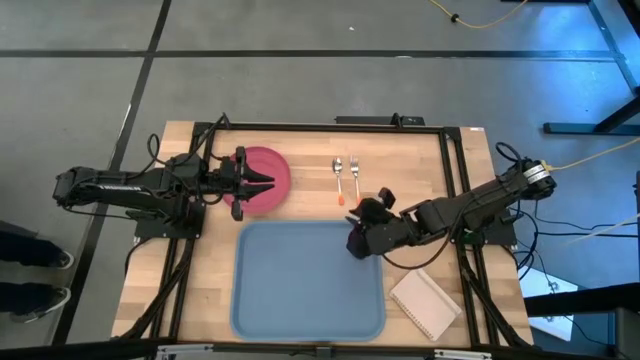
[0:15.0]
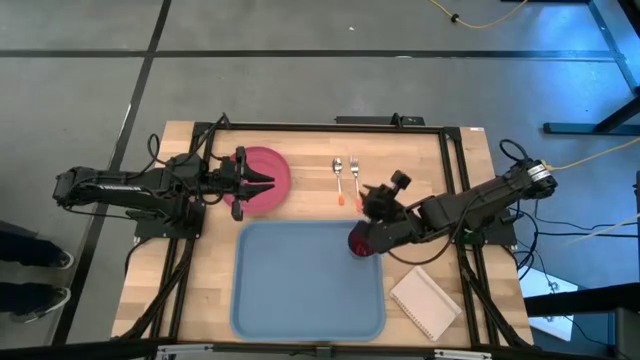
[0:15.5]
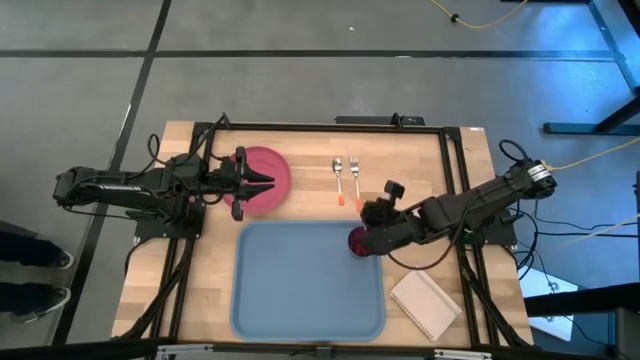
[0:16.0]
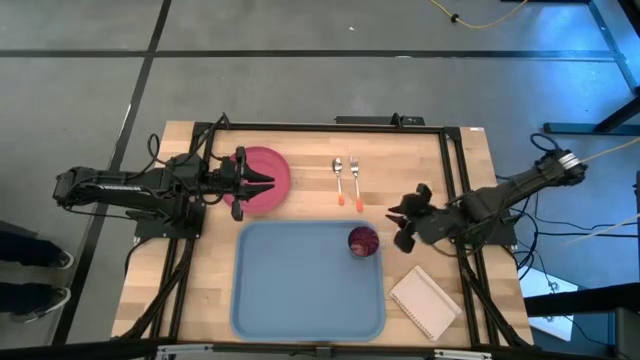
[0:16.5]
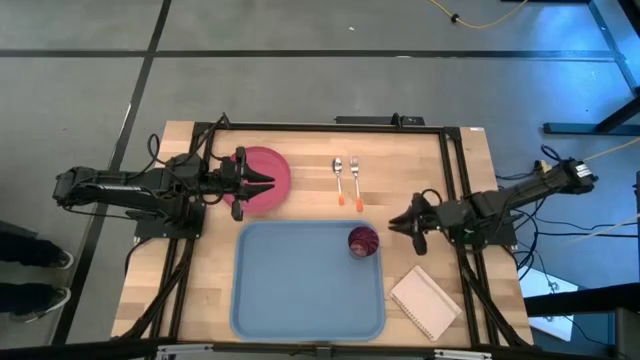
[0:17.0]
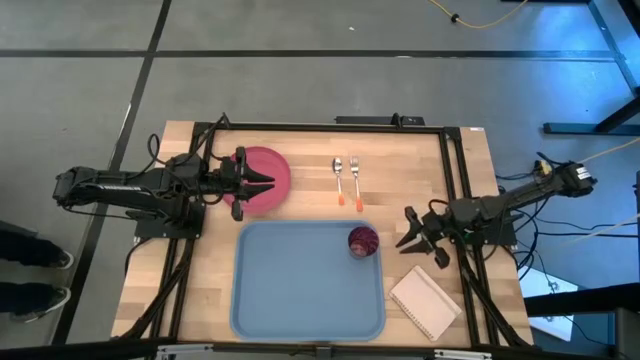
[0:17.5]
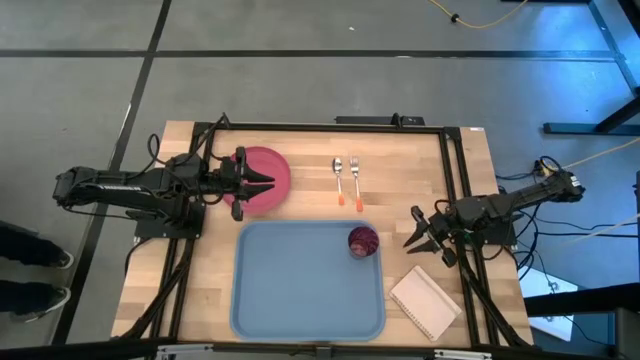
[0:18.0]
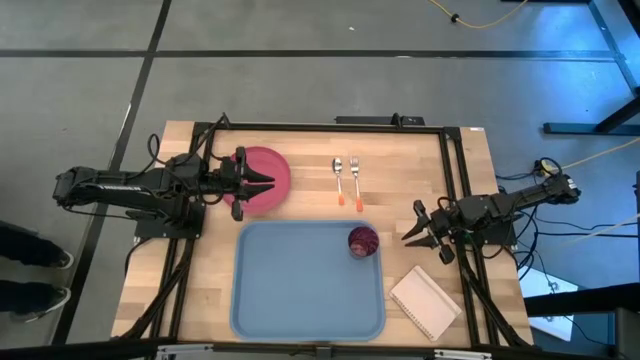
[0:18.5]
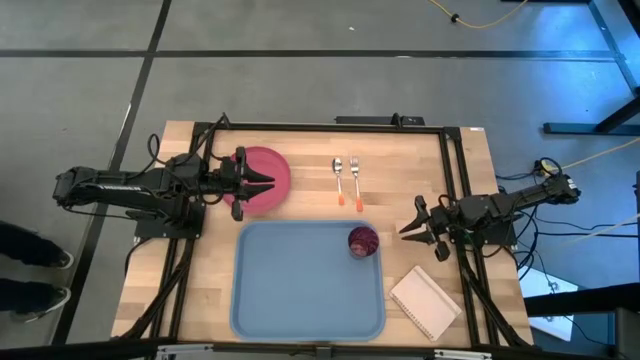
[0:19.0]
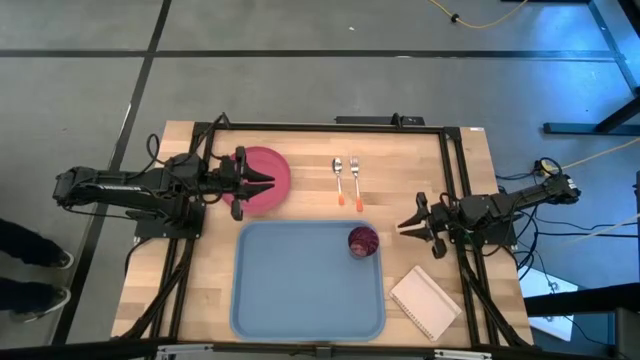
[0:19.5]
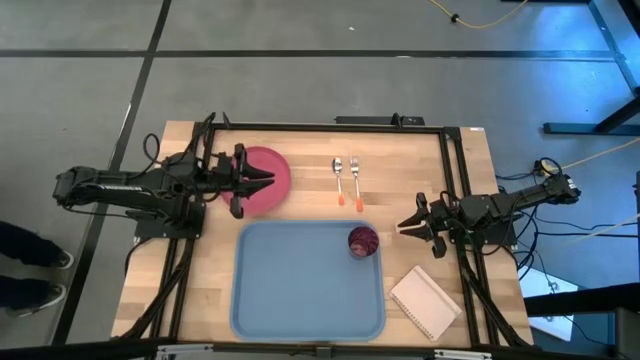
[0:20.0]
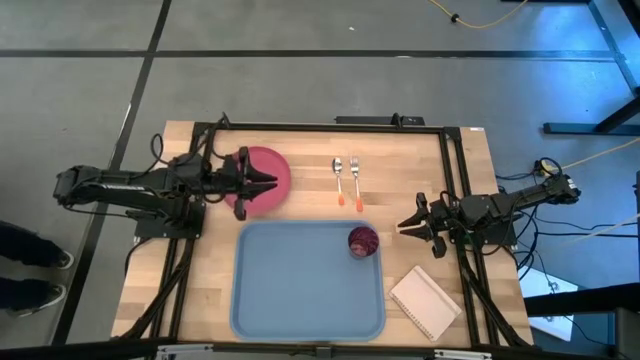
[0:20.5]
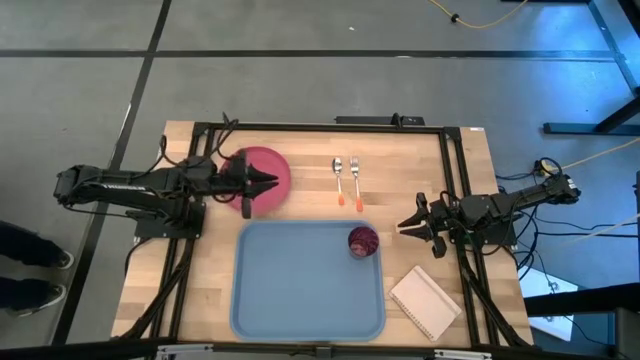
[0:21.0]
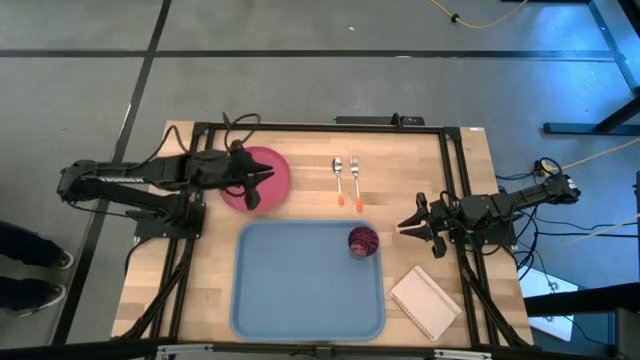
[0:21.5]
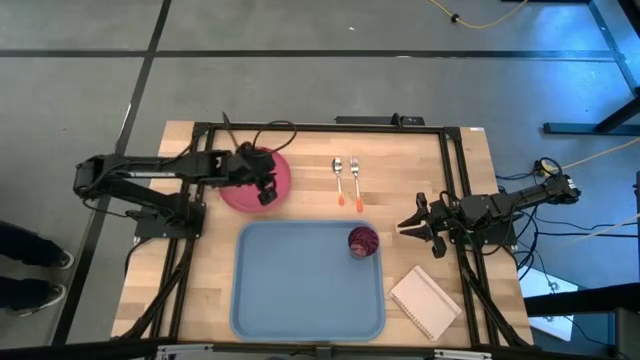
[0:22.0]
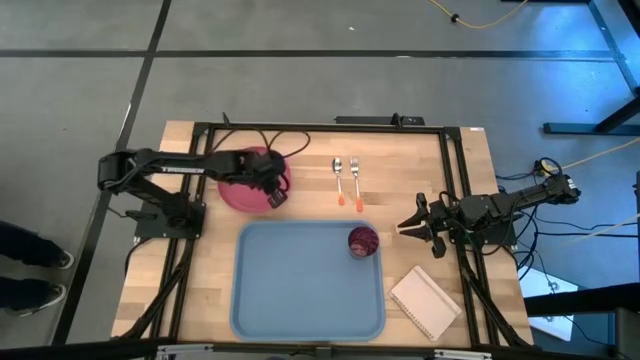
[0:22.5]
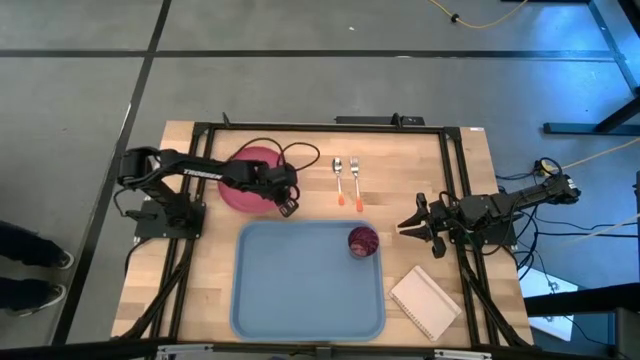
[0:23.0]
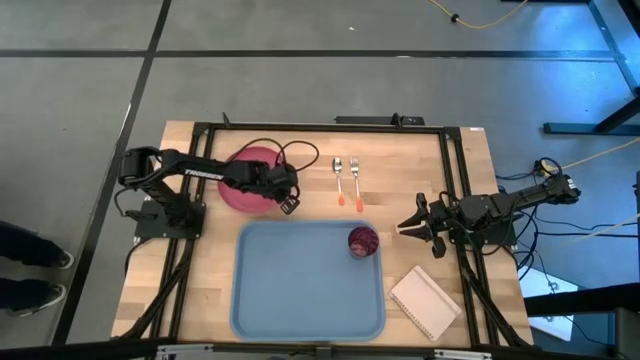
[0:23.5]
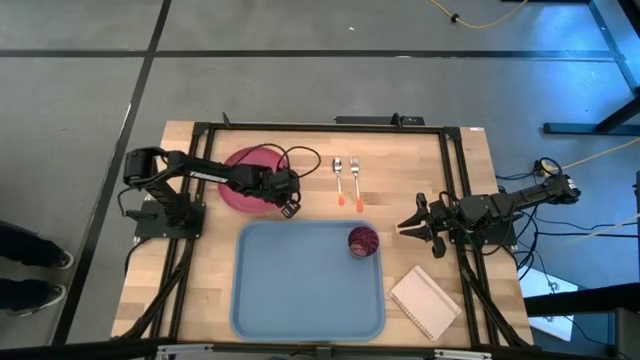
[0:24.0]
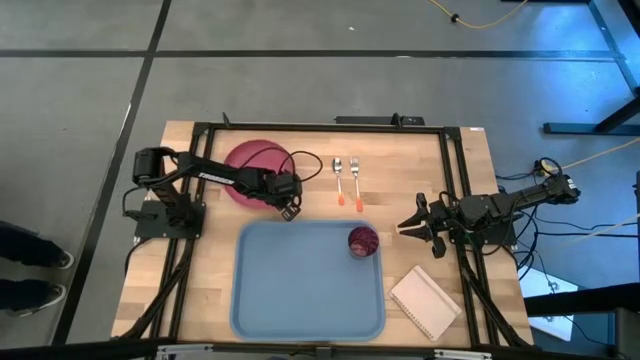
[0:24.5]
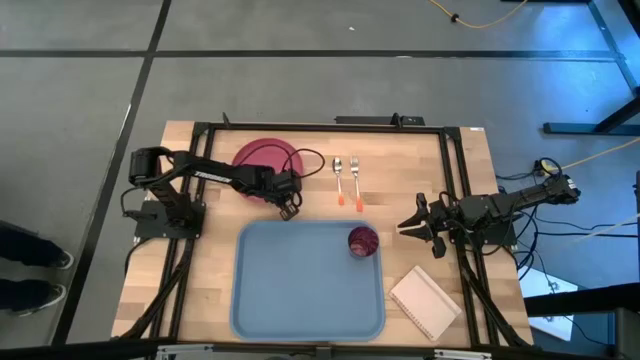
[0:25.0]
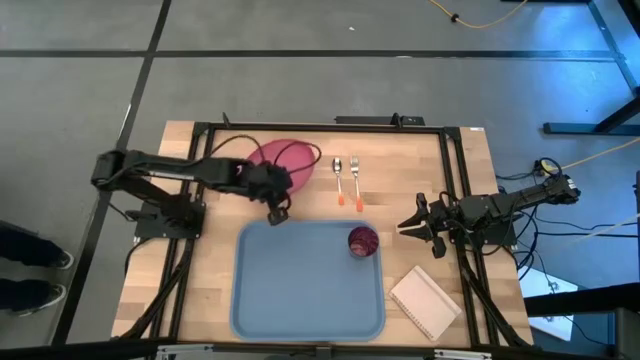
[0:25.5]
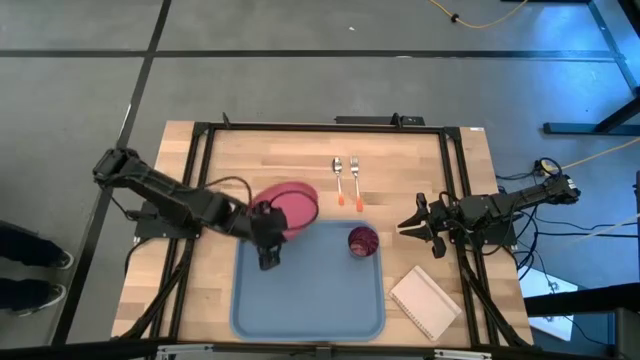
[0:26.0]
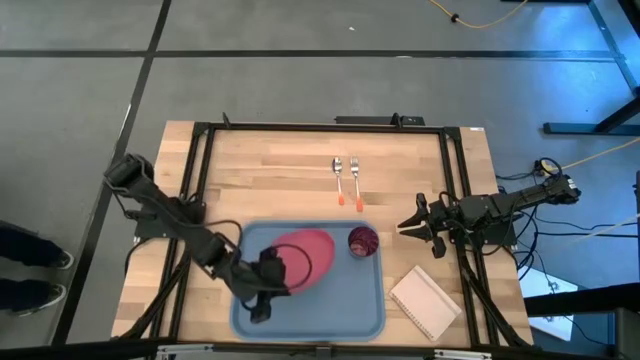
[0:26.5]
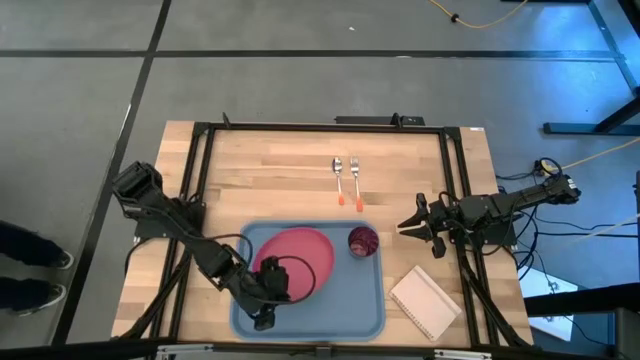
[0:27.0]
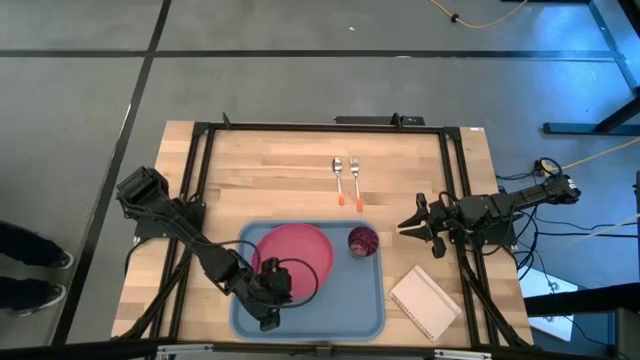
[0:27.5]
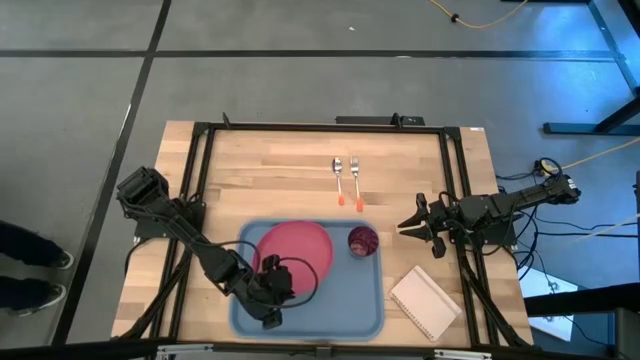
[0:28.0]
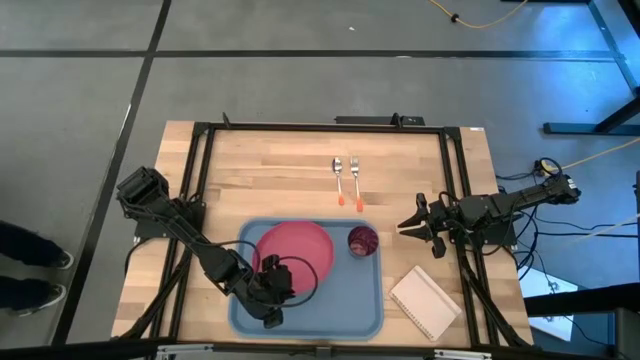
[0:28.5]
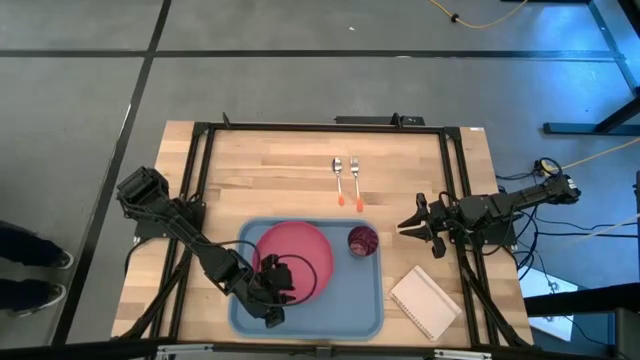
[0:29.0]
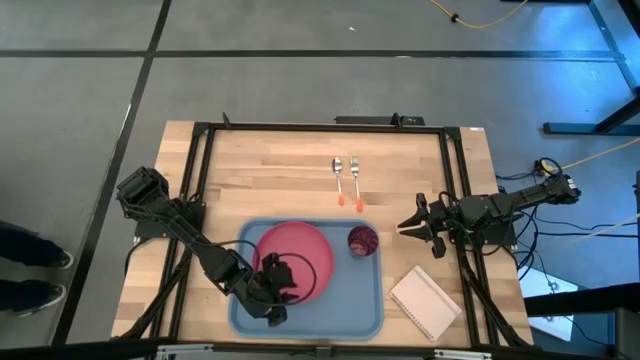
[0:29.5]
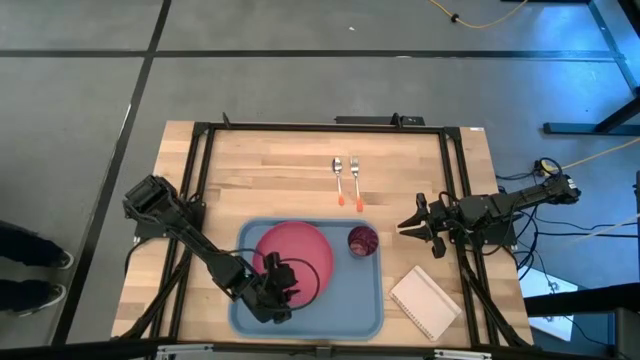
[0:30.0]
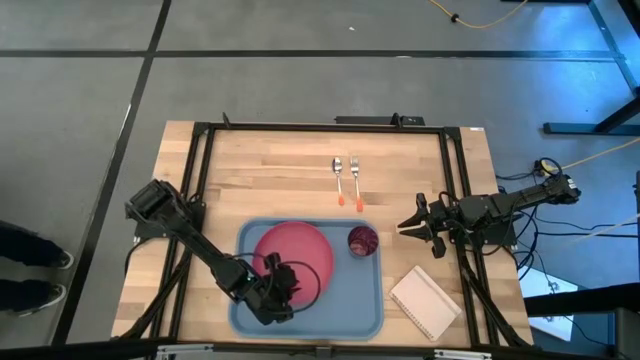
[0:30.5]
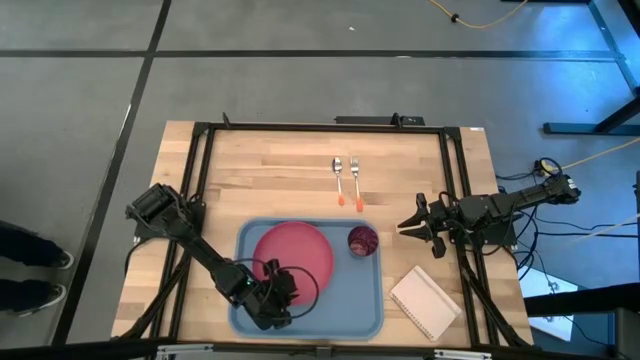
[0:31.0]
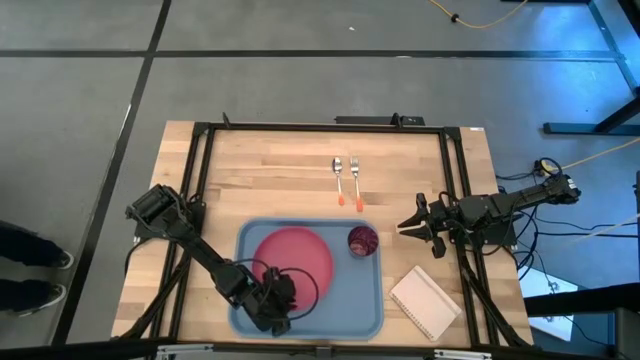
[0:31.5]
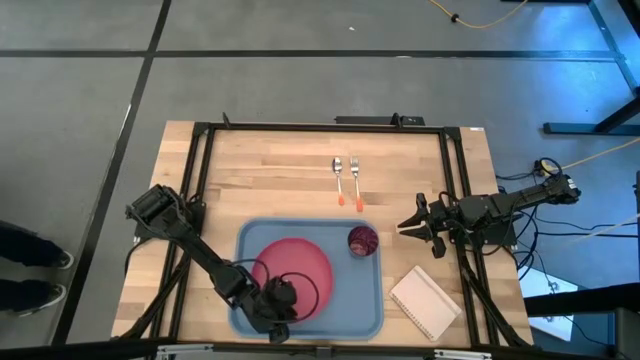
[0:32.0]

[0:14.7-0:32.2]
Task: Pick and place plate/cup/fork/spoon on tray
Put the pink plate on the bottom left of the red cup

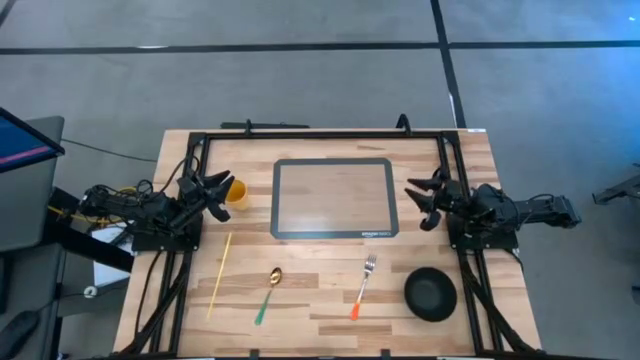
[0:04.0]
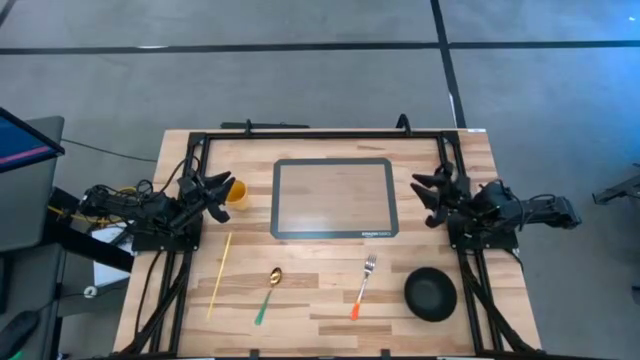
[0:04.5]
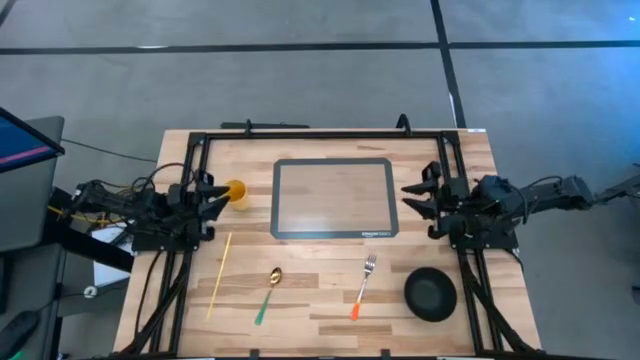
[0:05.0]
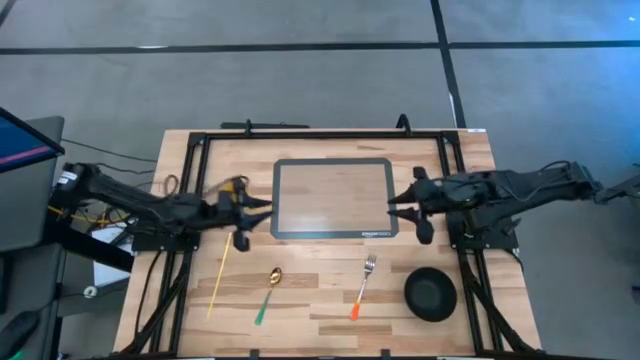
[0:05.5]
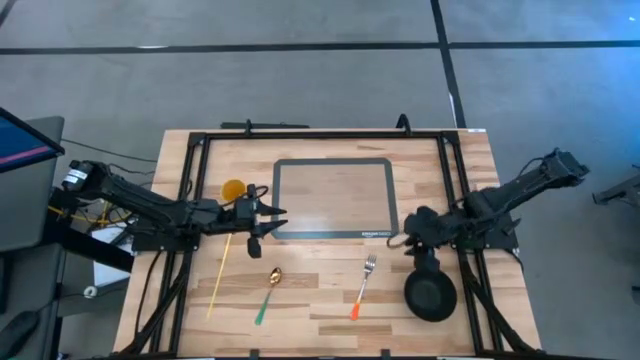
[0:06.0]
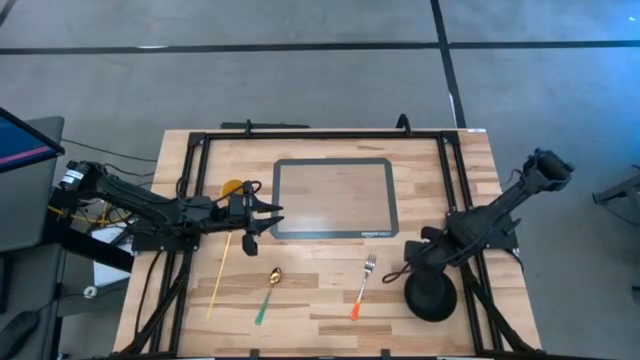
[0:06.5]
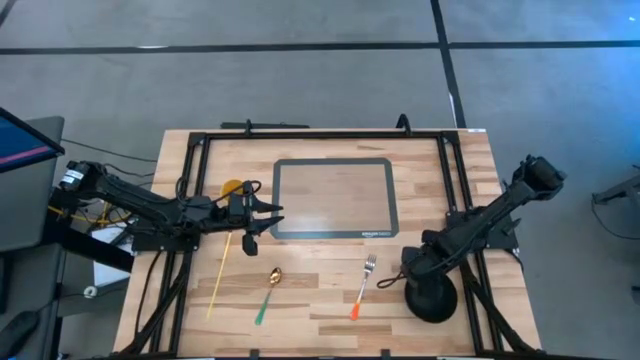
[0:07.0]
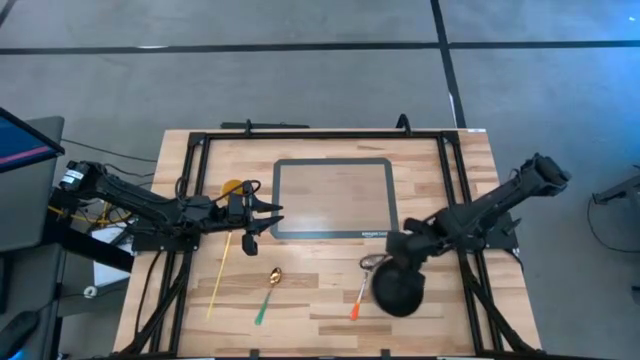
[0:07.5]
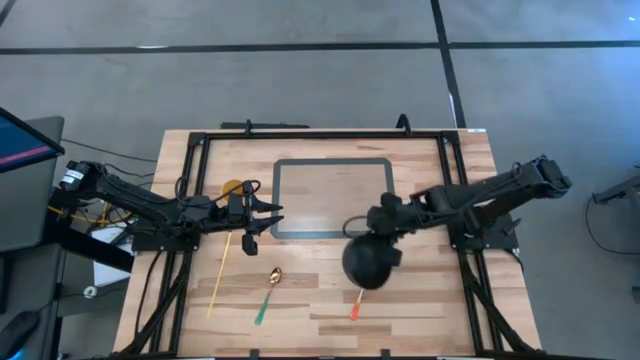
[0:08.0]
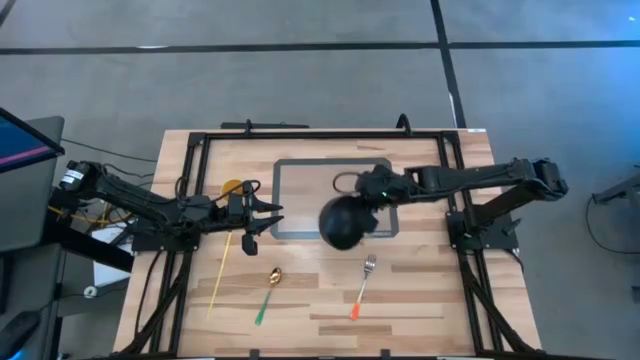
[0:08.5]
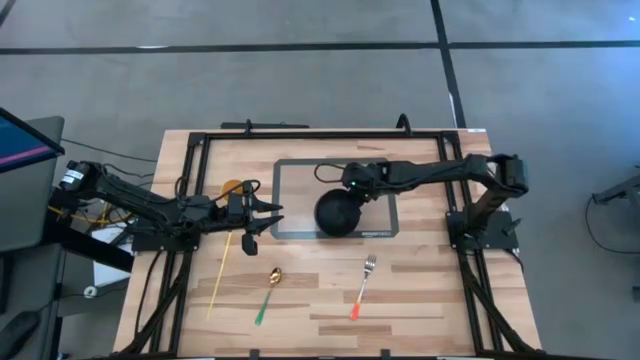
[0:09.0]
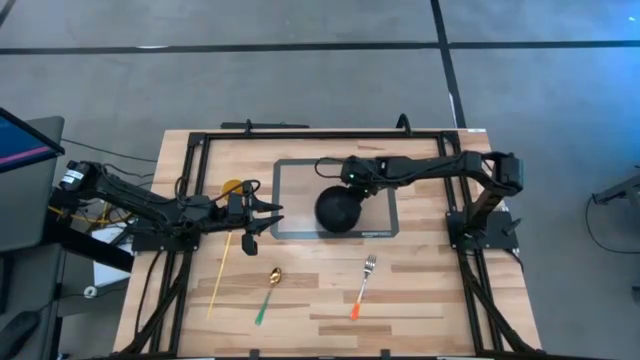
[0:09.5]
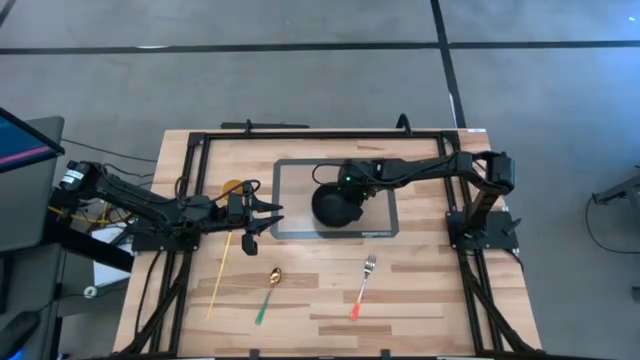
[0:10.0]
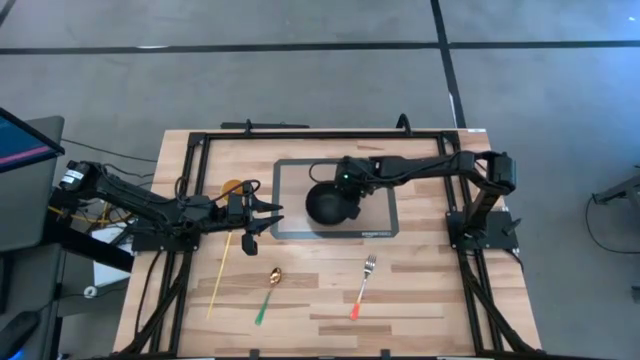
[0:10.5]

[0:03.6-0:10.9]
Task: Pick & Place Utensil
Put the black bowl in the center of the gray transparent placemat
